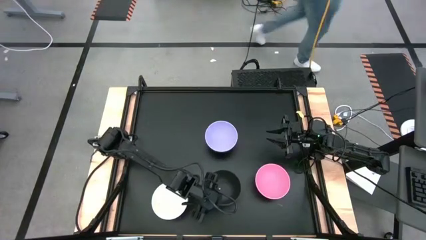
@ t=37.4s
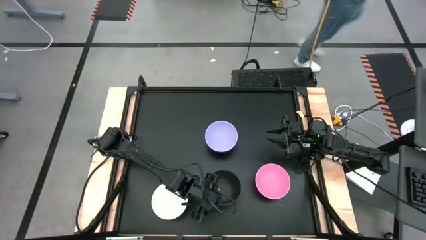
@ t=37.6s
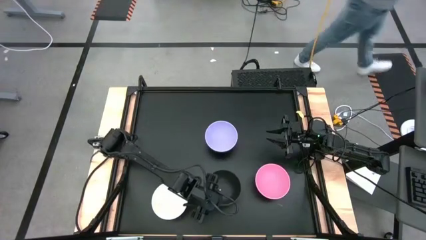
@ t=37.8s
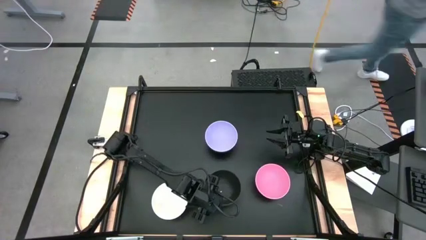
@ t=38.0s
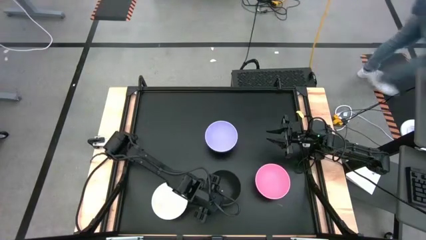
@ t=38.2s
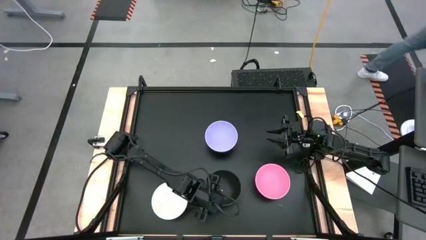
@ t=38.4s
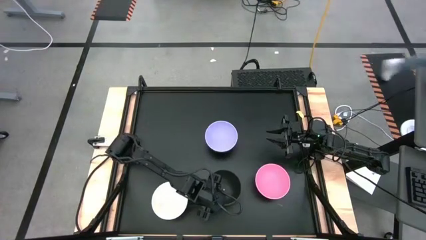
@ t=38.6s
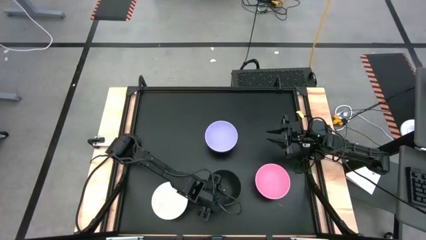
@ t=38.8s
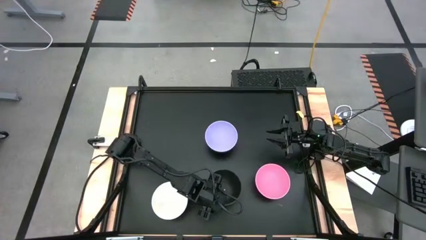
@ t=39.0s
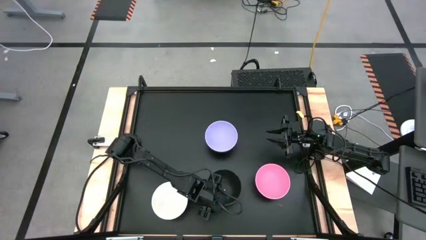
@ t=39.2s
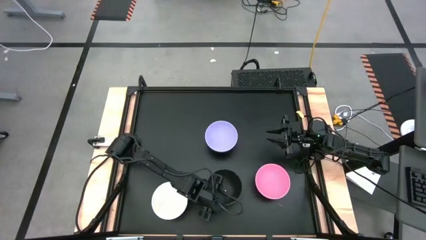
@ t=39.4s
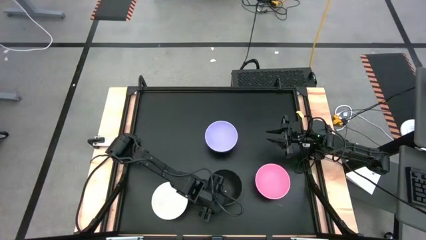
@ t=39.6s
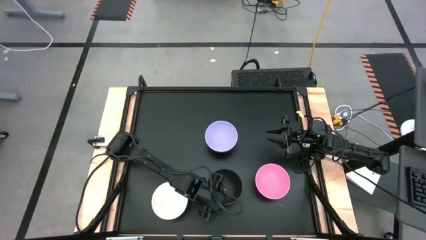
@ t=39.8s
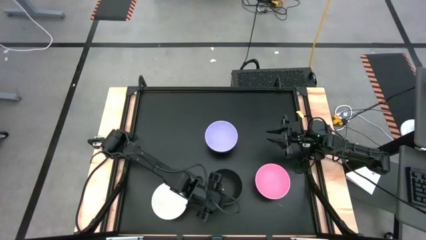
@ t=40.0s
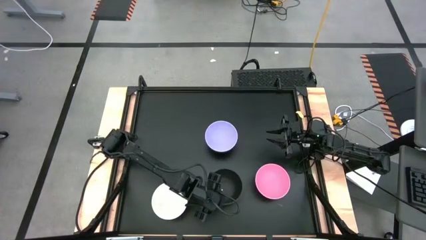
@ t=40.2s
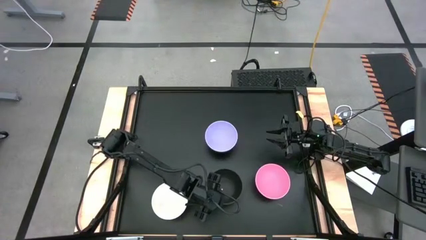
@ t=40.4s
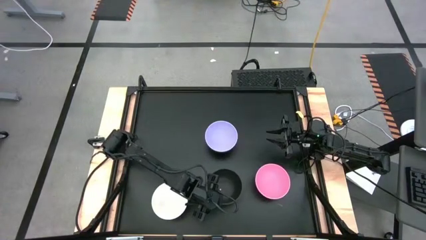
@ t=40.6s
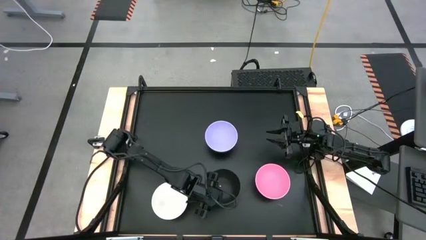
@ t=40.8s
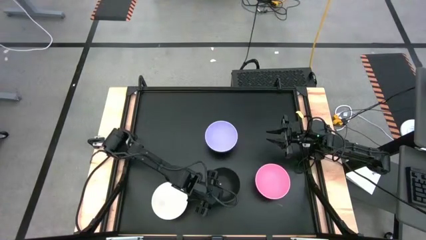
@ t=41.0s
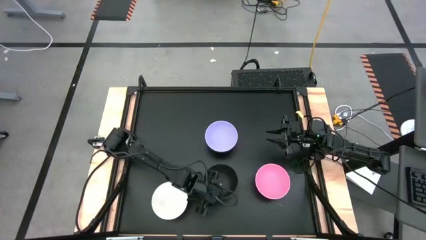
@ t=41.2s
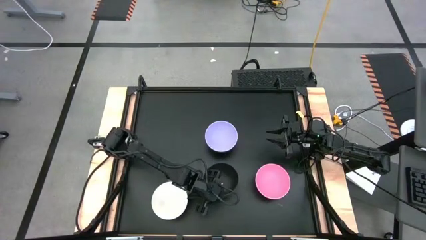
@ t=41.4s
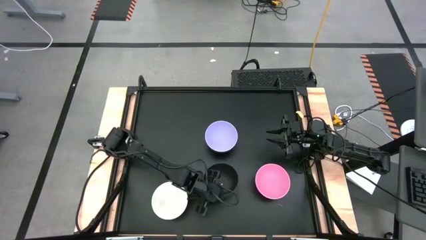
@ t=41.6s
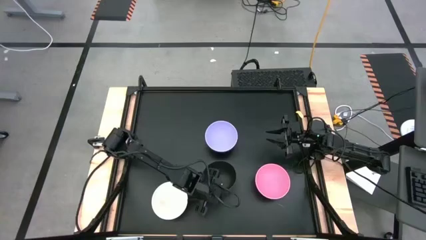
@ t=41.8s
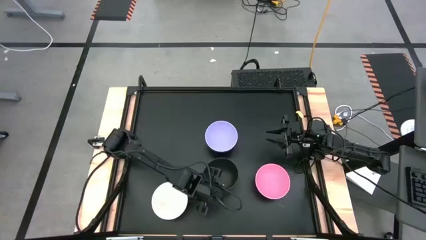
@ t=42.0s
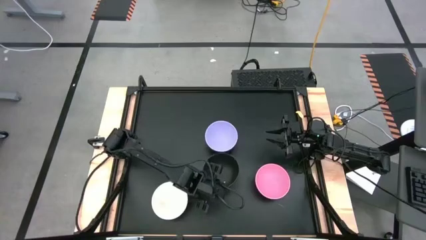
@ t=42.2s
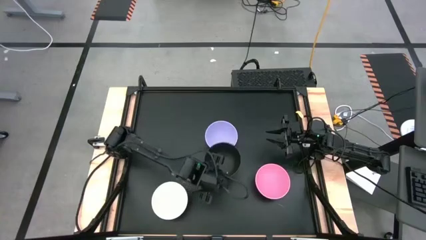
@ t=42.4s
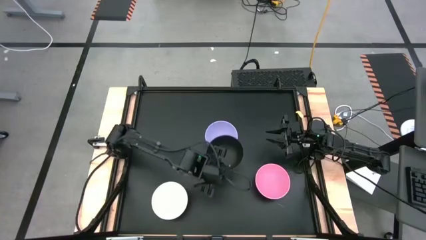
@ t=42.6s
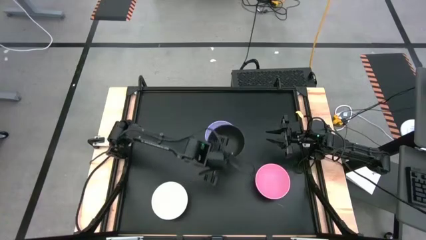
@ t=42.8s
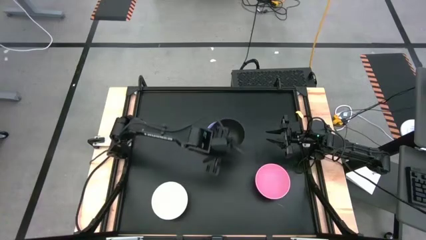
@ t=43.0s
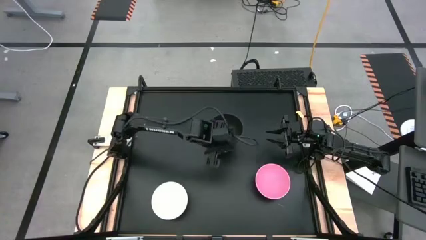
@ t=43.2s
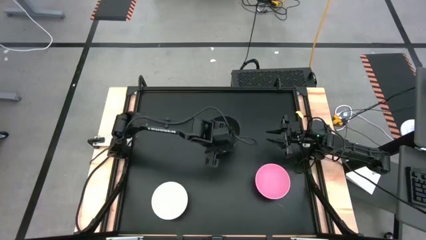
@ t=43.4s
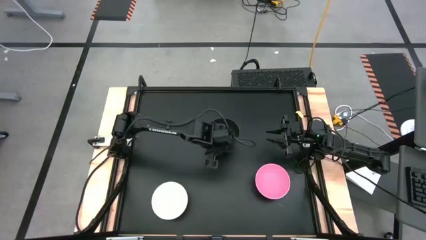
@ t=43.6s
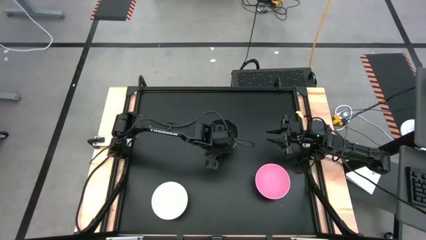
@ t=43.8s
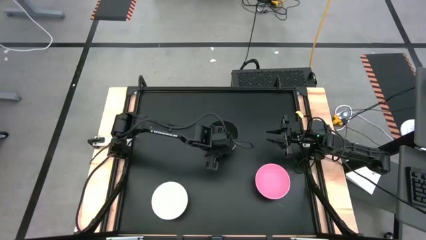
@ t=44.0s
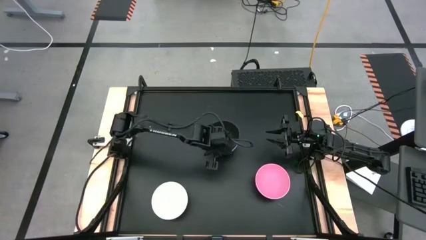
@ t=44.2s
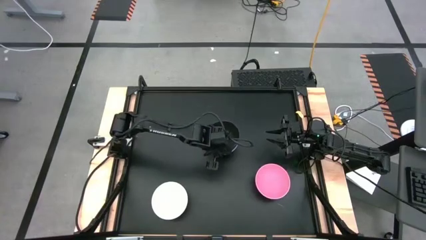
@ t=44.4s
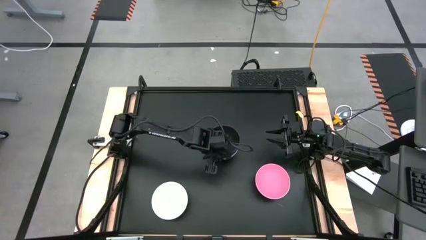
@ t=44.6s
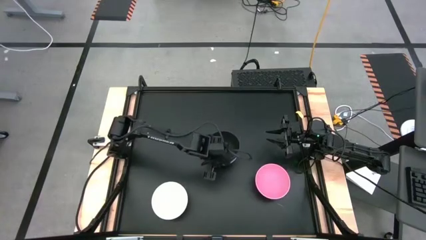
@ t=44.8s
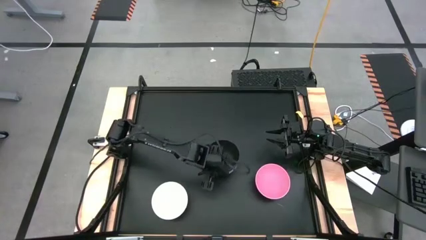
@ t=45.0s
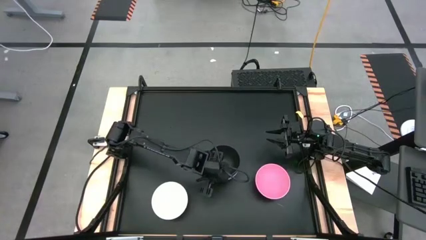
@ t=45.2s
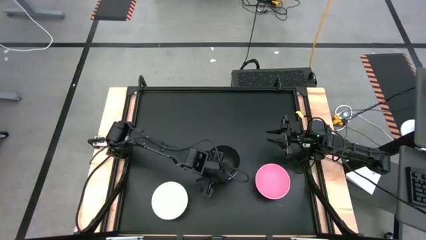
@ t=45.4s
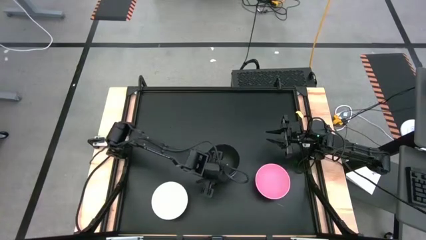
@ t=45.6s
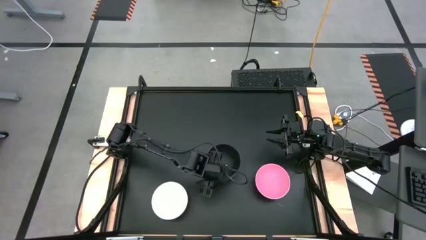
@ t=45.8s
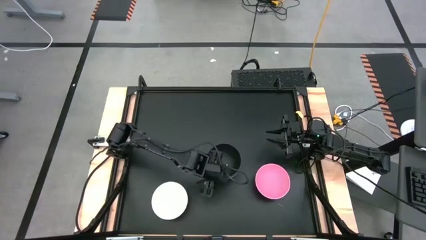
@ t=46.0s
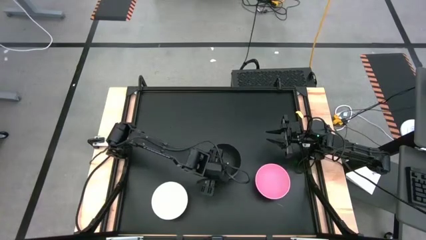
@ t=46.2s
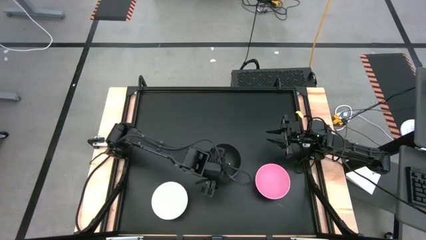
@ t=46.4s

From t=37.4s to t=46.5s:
Task: Nest bowls inside each other
Stack the black bowls on top of the purple bowl

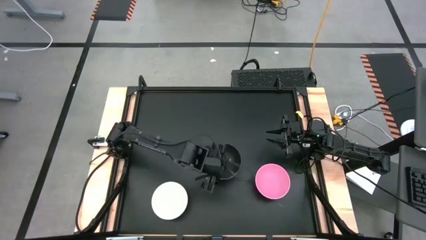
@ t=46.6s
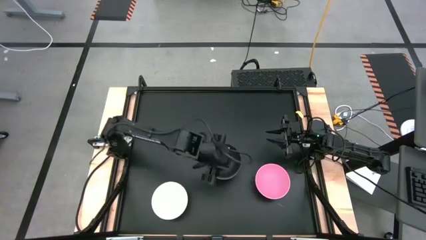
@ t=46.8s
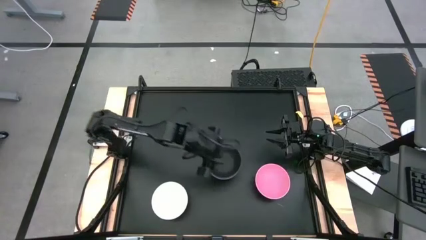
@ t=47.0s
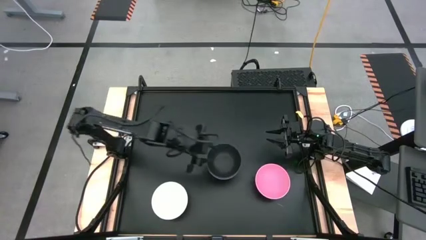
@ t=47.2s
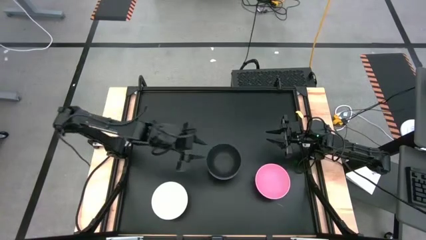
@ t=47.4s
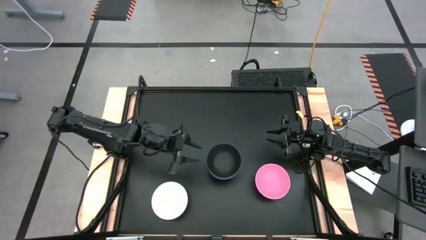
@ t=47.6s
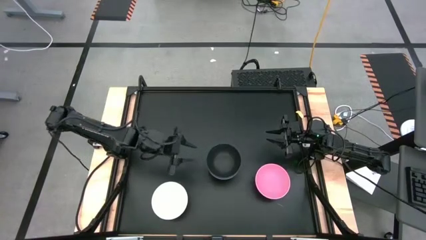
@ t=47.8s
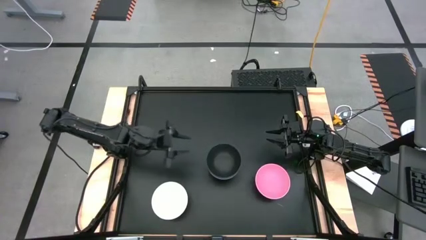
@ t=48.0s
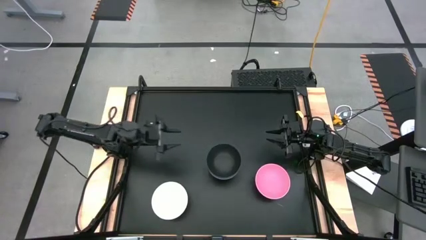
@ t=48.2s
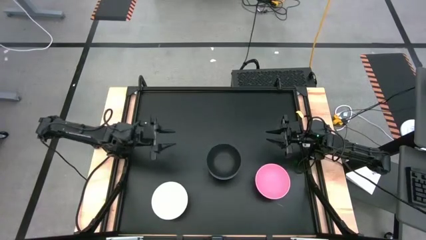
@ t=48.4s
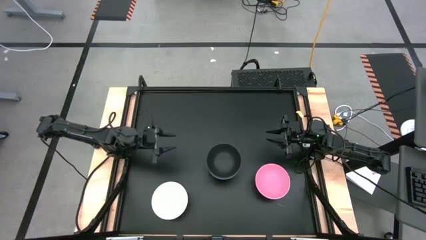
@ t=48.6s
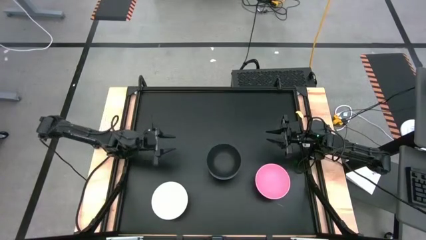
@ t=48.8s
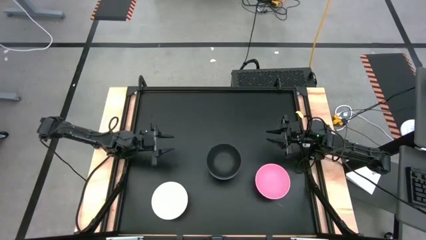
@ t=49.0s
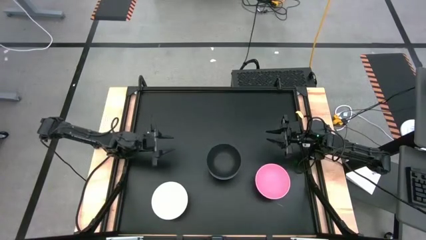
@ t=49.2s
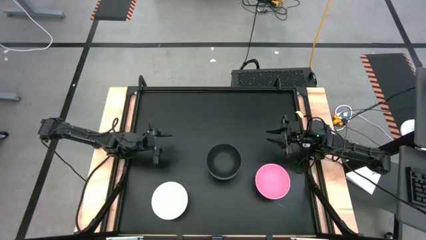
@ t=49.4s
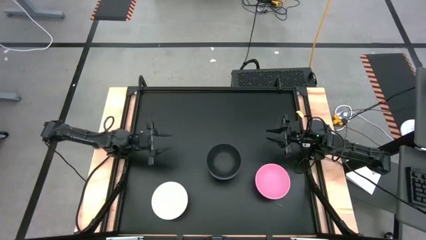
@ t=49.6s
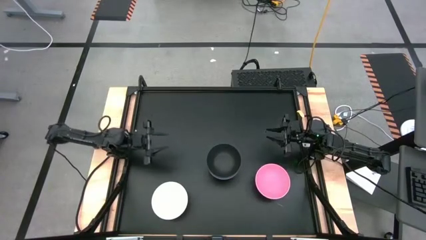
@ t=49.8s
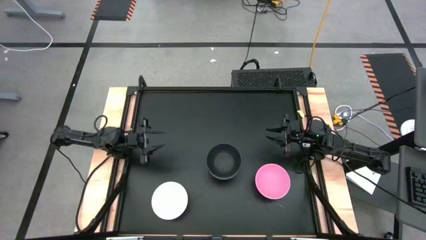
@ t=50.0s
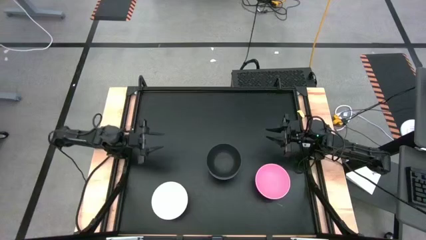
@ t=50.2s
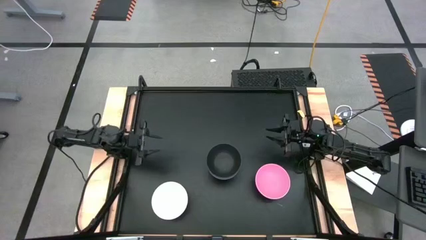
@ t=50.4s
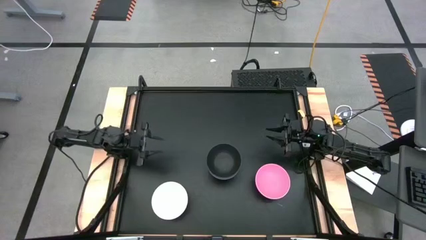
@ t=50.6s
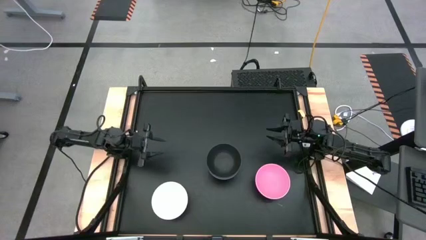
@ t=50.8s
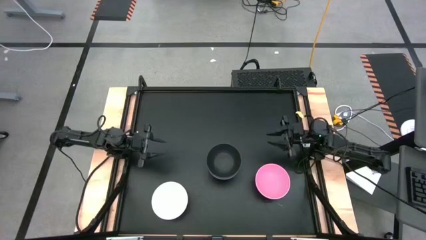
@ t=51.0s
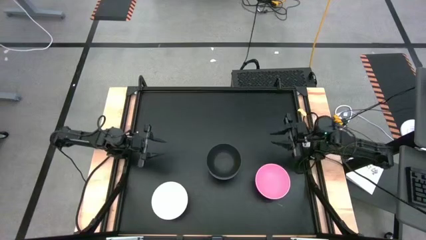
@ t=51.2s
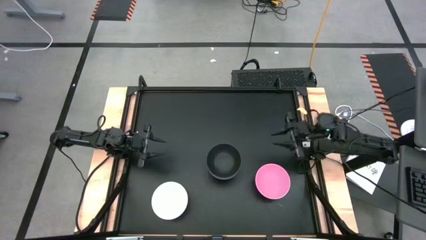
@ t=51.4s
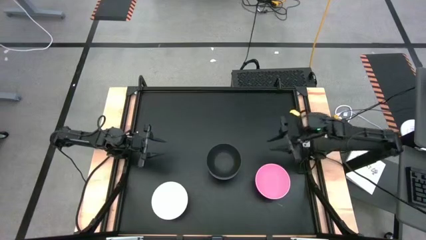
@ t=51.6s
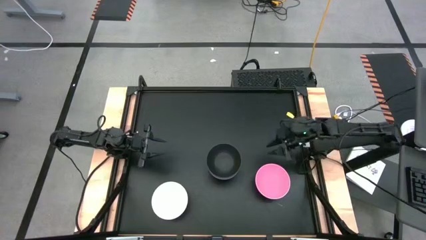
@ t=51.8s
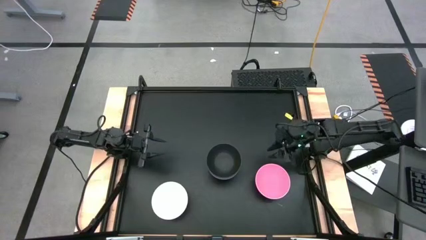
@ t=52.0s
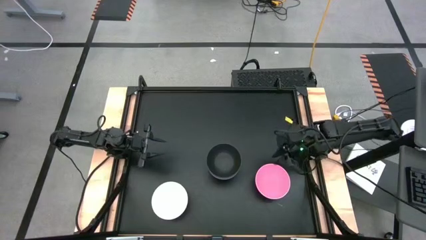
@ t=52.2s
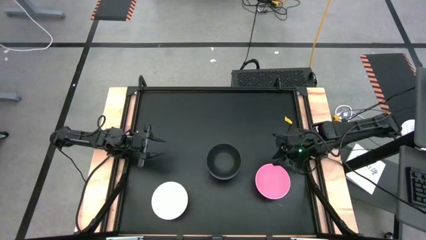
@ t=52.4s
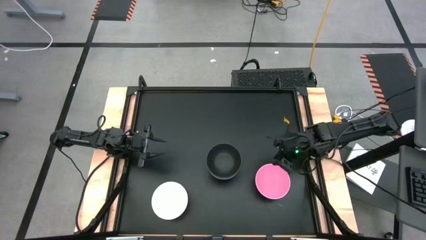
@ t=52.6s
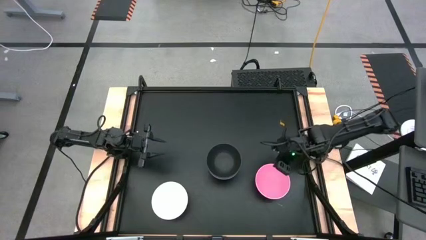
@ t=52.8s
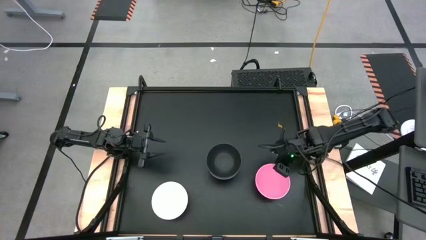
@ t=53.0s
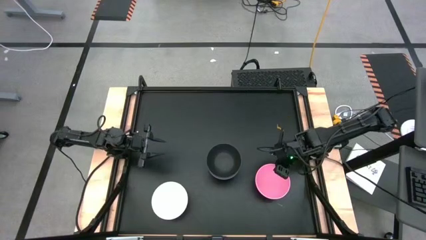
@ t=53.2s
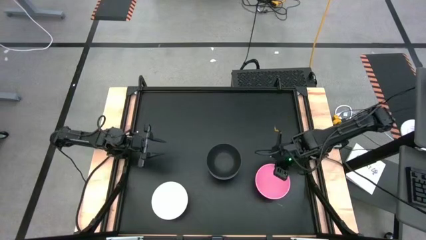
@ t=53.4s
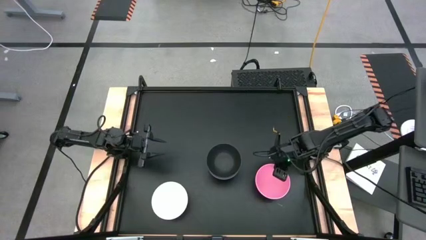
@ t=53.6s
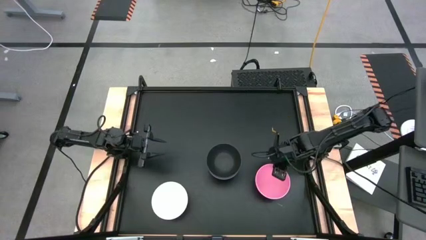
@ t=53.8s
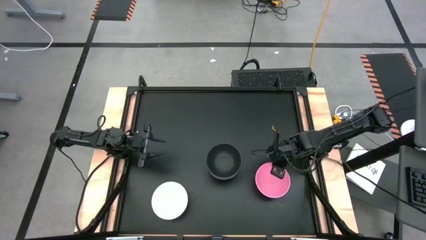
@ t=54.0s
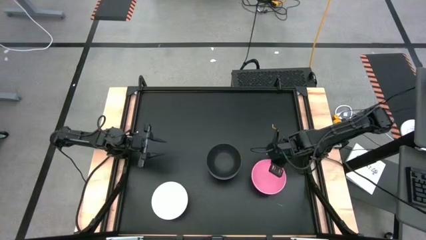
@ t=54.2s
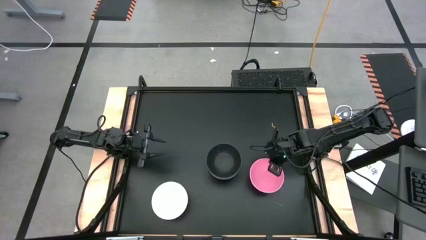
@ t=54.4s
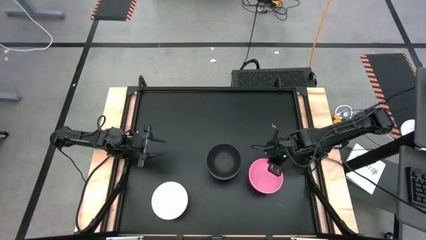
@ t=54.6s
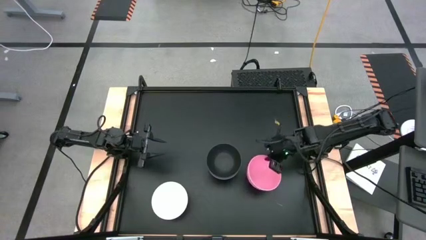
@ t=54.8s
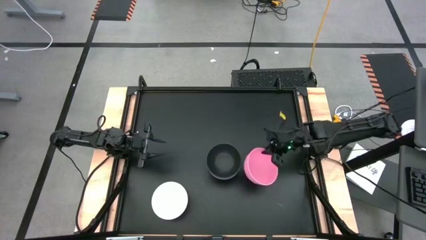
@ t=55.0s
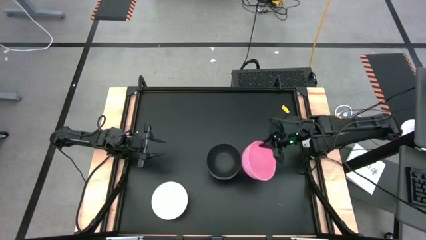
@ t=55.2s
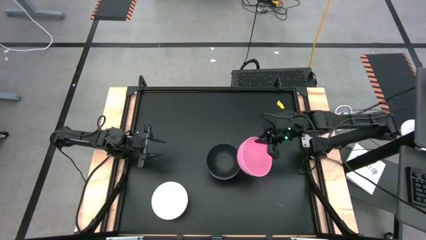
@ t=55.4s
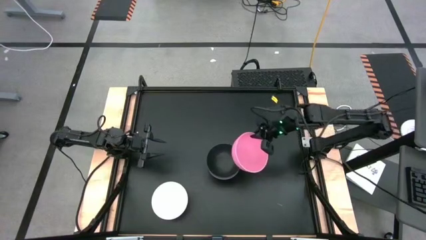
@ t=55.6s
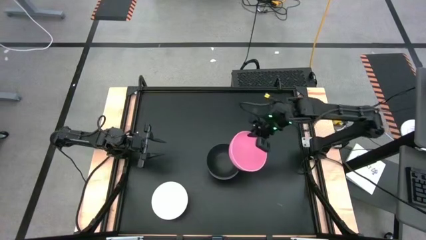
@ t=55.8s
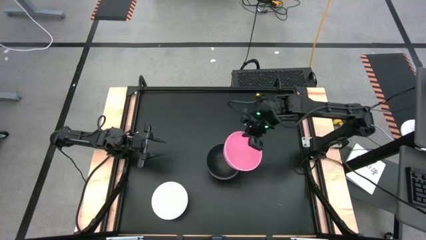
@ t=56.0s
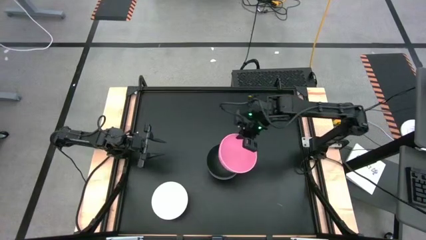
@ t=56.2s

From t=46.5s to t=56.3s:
Stack the pink bowl on top of the black bowl
